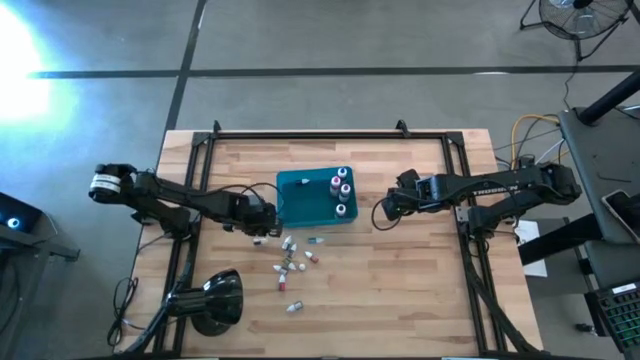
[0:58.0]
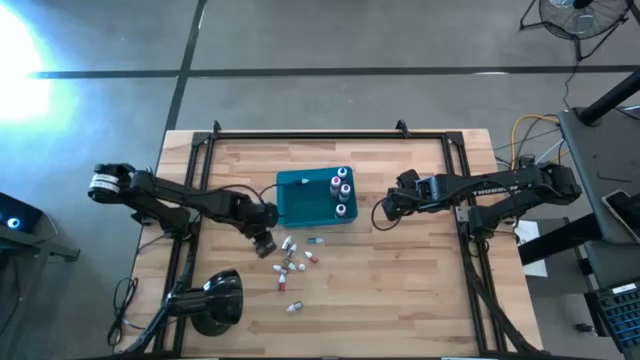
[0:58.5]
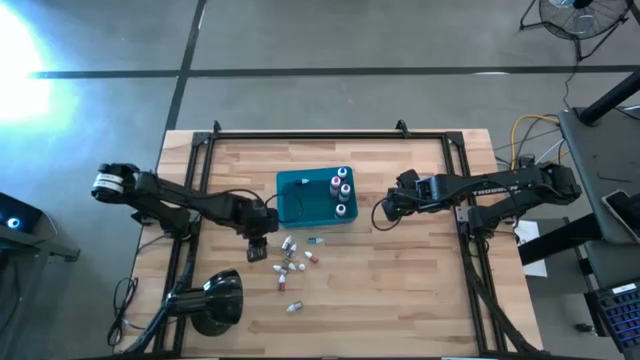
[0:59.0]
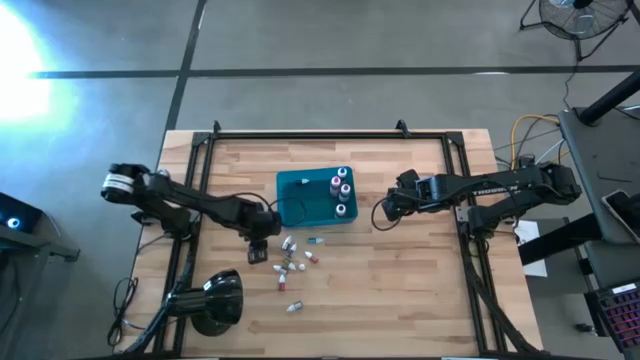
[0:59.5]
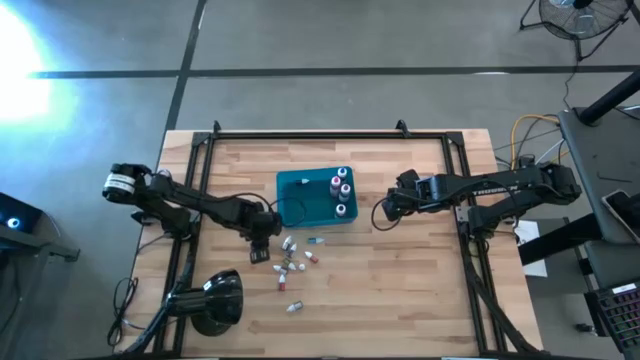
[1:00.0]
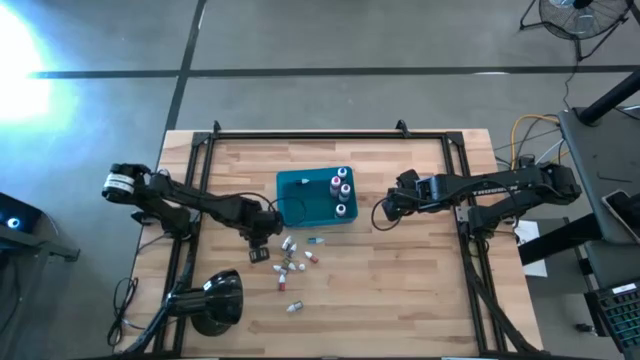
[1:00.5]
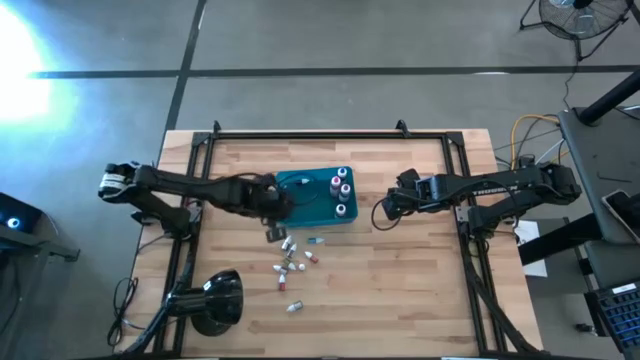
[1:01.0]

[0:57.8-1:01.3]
Task: Pick & Place food coloring
Put the small black food coloring bottle into the blue bin

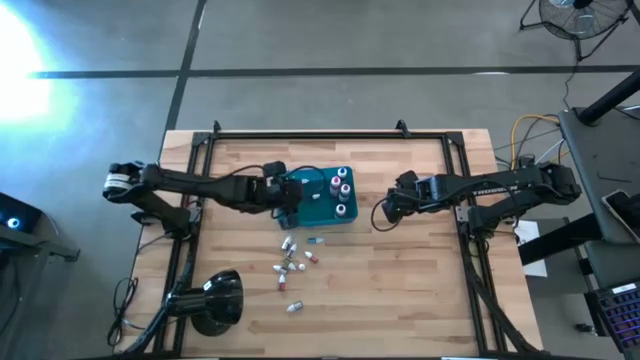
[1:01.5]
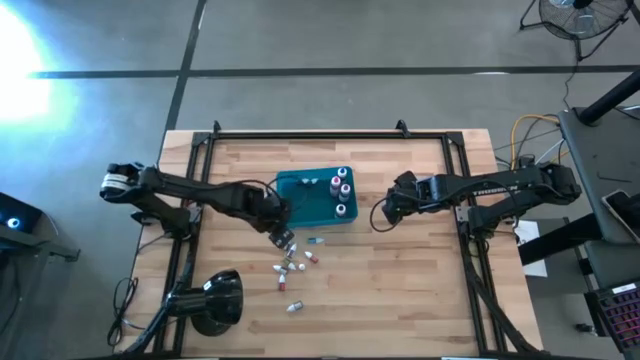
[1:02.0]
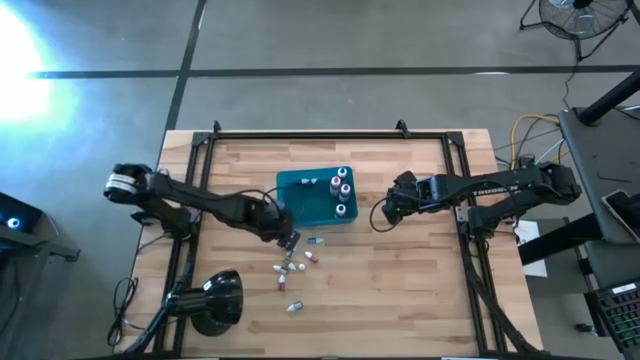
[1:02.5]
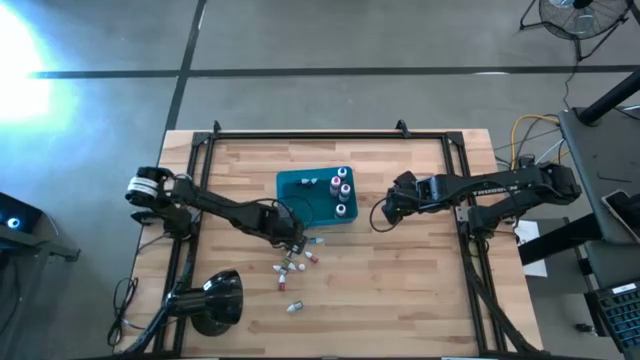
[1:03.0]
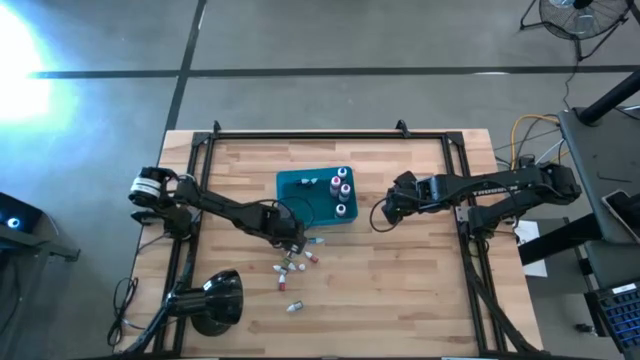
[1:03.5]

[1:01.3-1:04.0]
Put the small green food coloring bottle into the blue bin

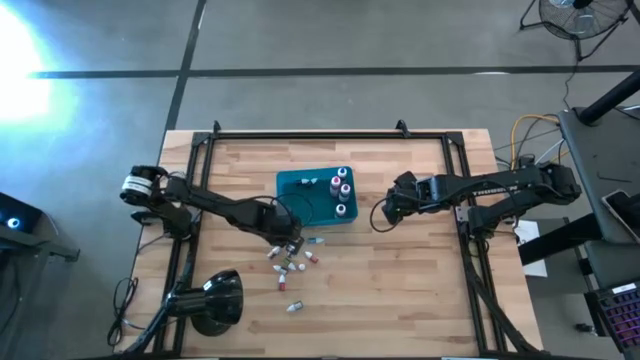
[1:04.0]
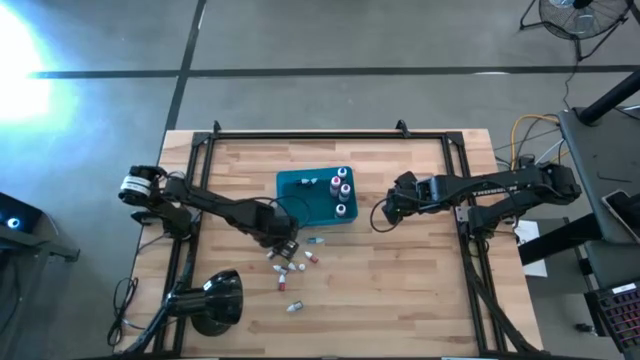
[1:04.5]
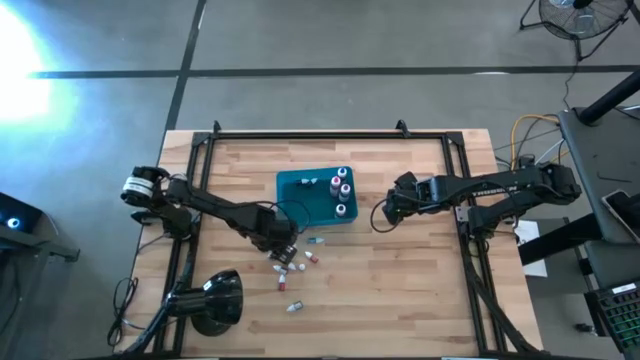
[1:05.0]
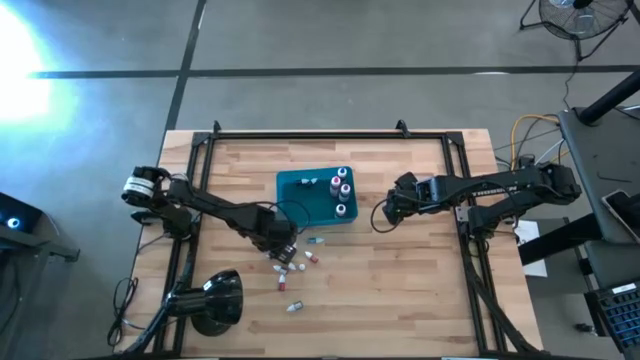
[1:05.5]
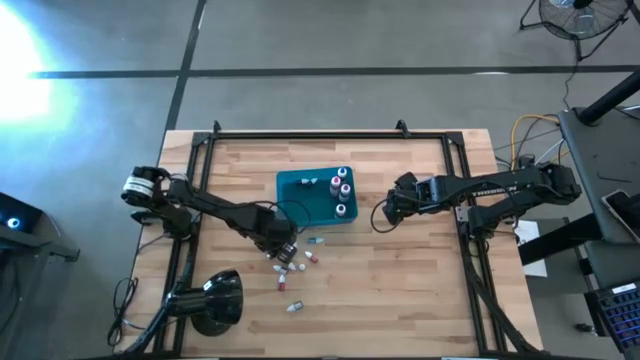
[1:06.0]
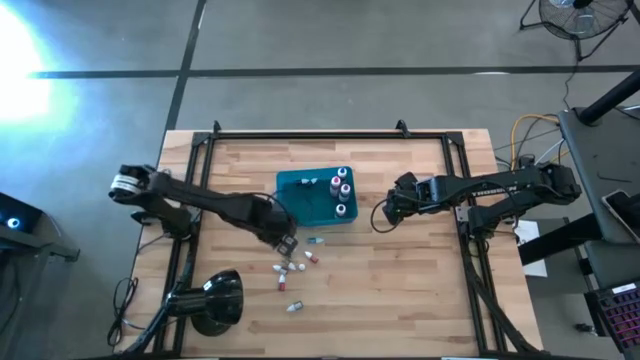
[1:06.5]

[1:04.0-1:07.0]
Put the small green food coloring bottle into the blue bin

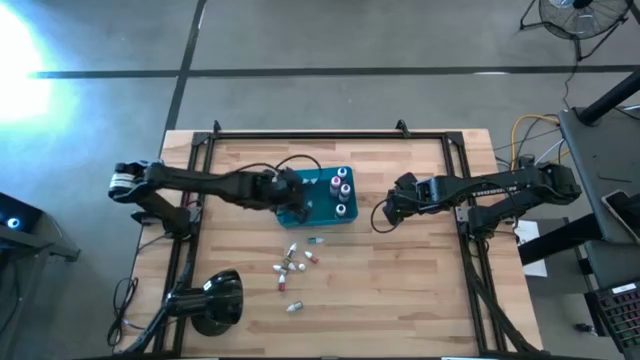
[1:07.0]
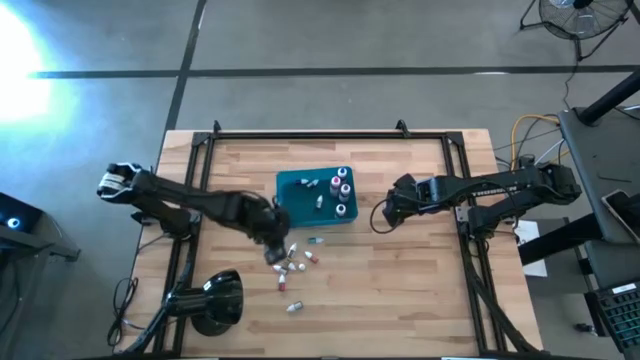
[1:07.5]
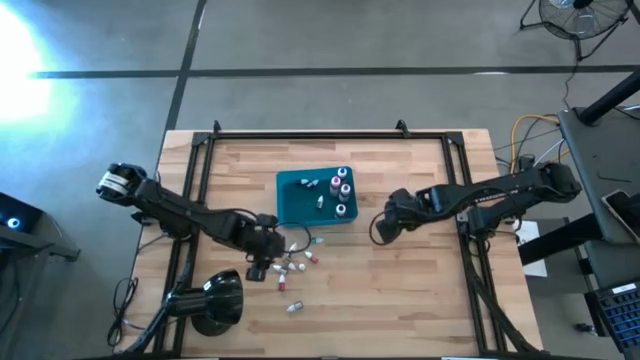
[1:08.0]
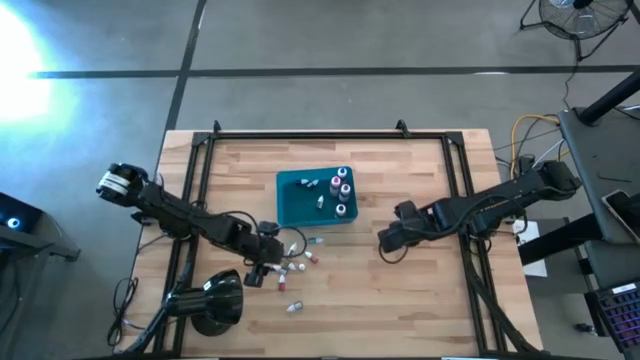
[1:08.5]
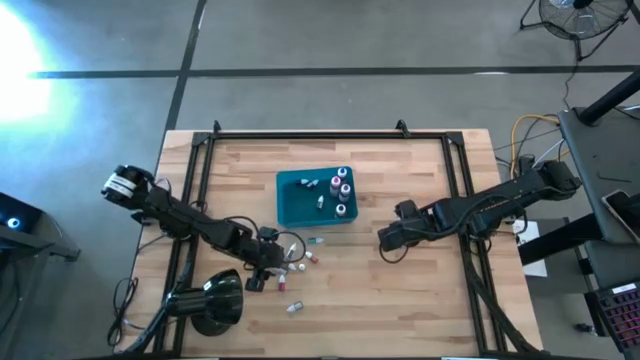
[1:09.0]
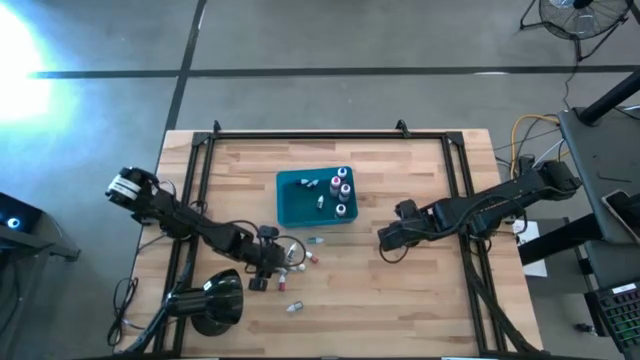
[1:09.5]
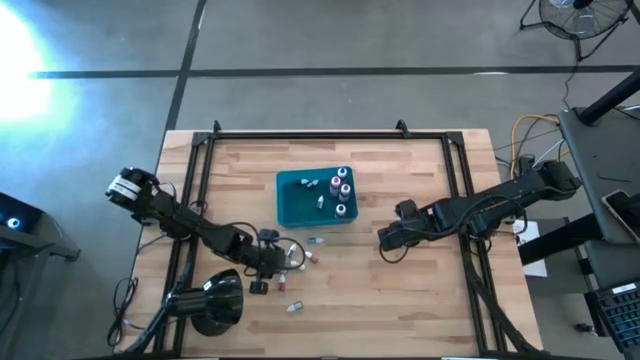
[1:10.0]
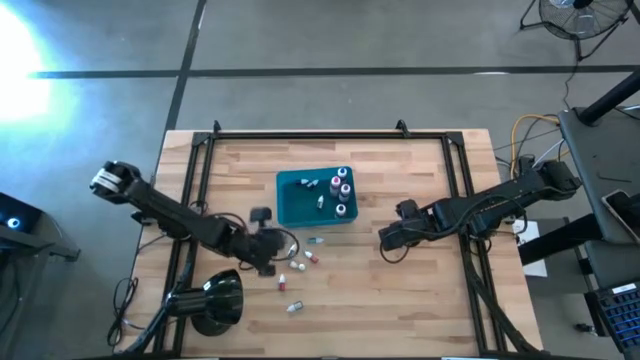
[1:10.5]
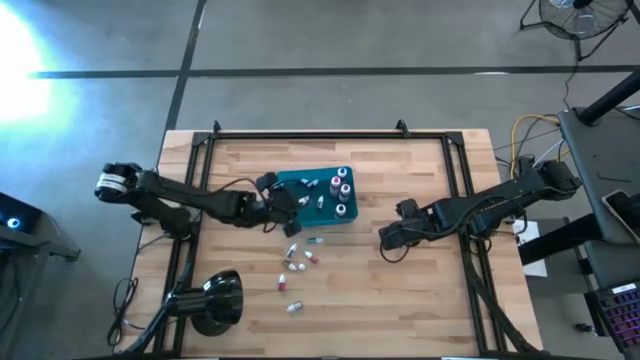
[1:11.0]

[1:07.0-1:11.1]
Put the small red food coloring bottle into the blue bin

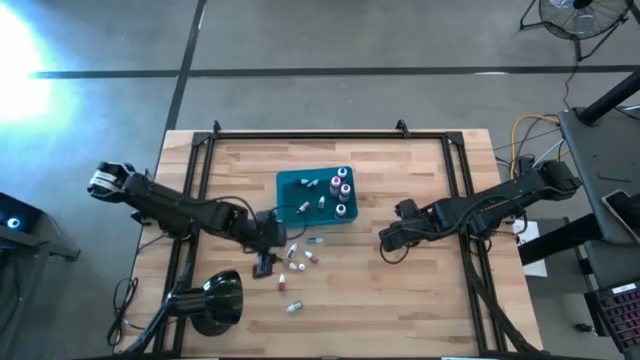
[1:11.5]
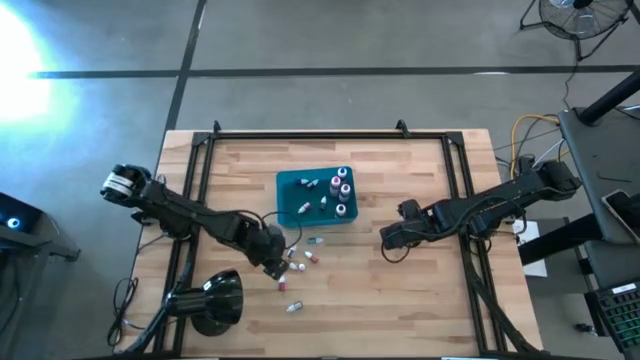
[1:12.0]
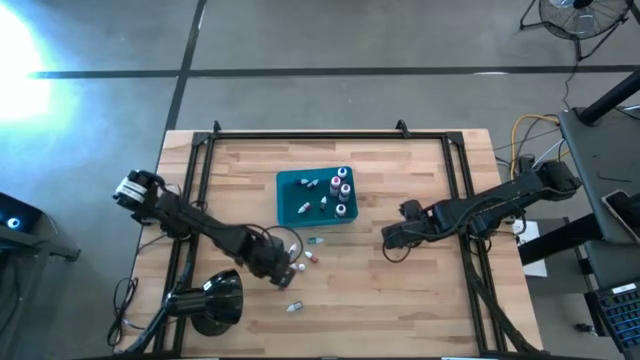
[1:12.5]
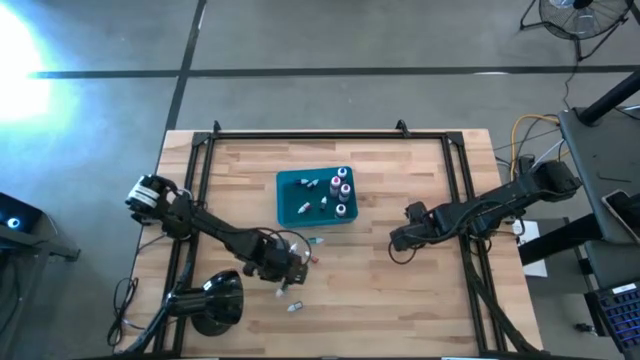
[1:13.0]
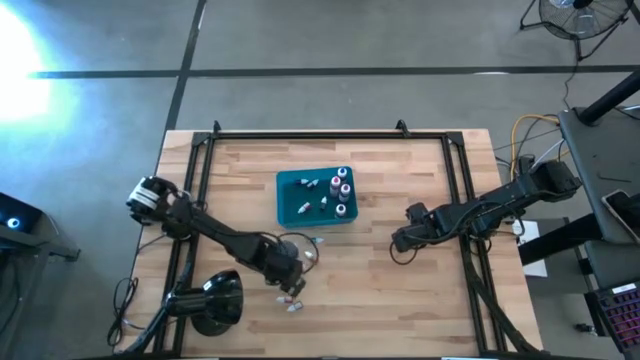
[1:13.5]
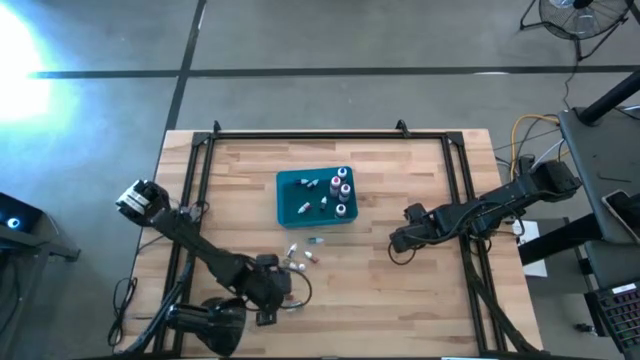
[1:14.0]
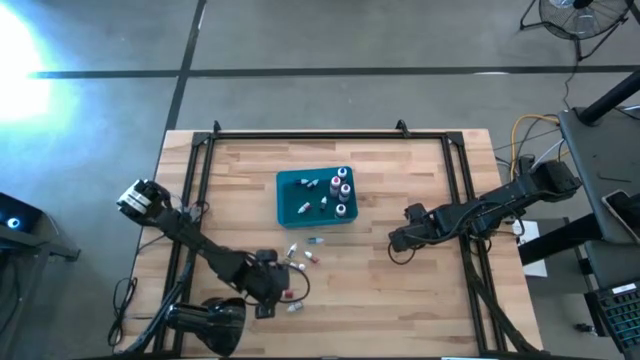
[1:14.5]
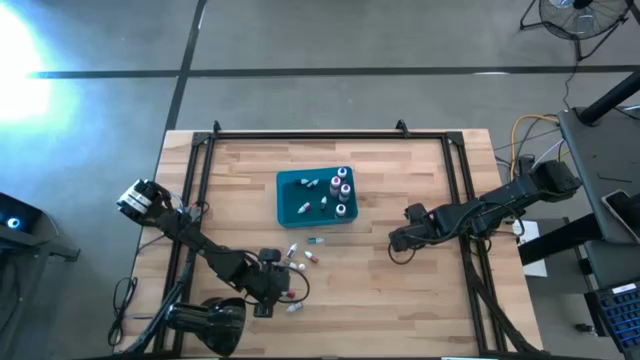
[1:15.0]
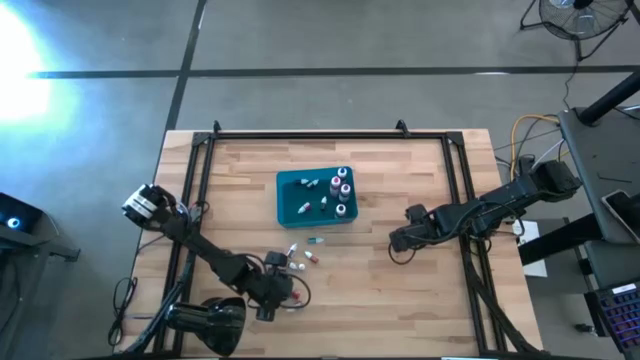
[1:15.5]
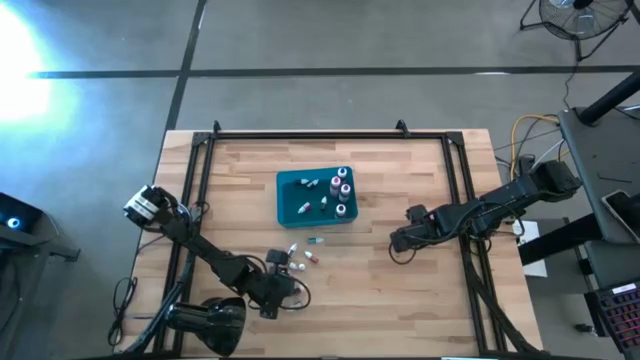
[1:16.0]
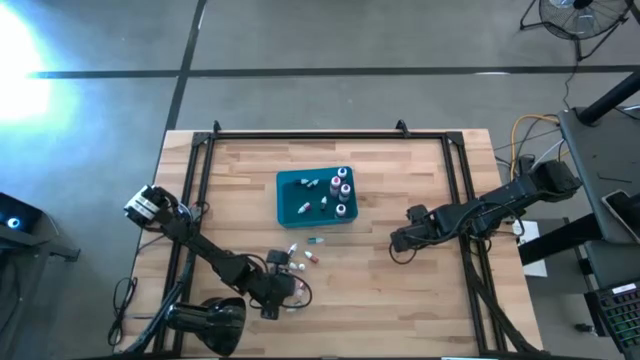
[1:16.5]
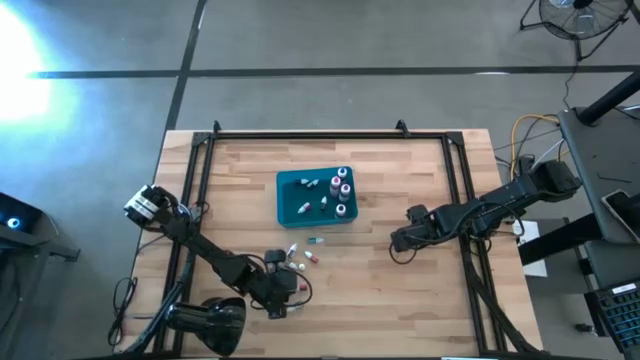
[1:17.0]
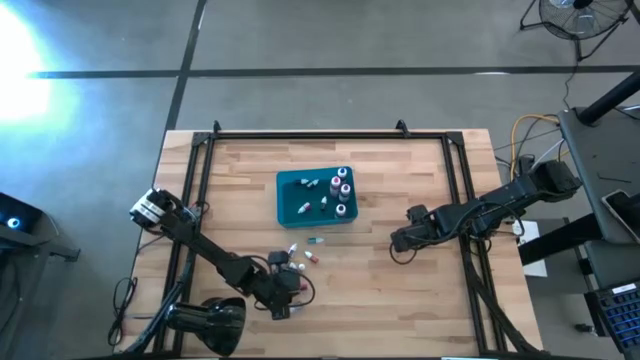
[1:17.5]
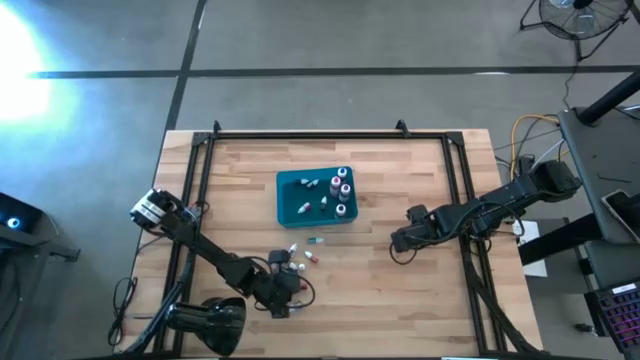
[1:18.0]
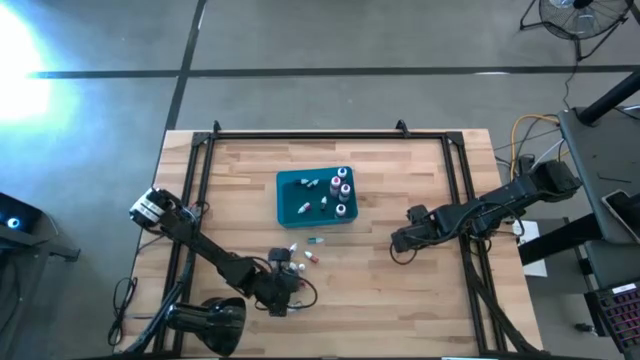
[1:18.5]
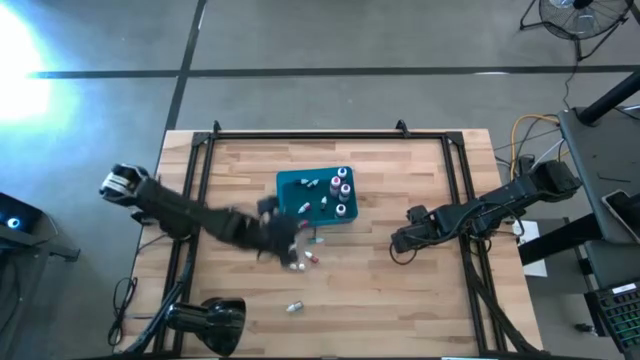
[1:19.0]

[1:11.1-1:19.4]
Put the small red food coloring bottle into the blue bin
